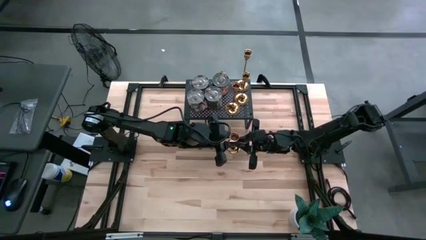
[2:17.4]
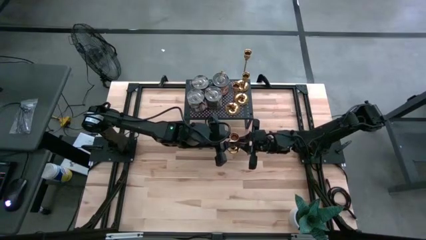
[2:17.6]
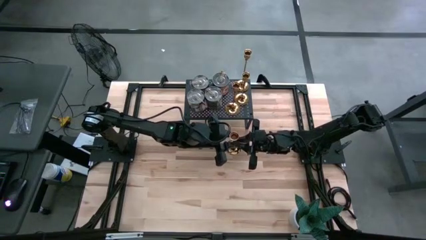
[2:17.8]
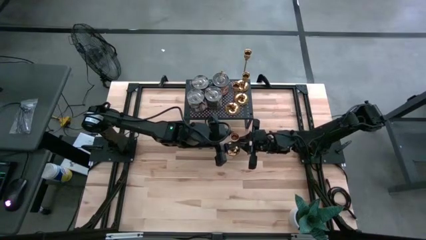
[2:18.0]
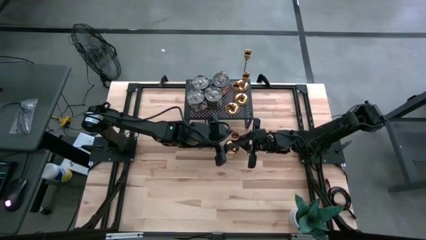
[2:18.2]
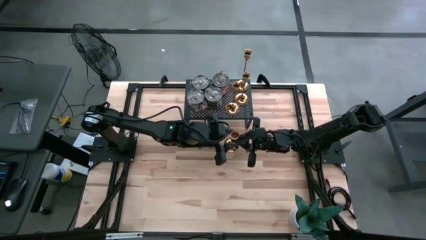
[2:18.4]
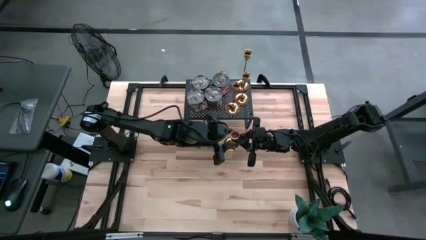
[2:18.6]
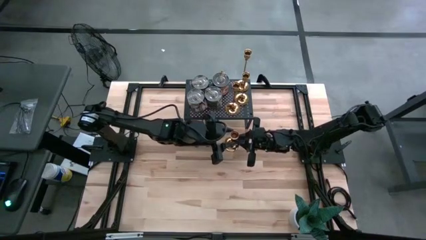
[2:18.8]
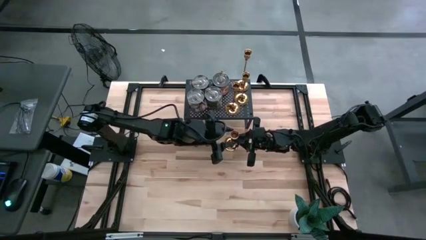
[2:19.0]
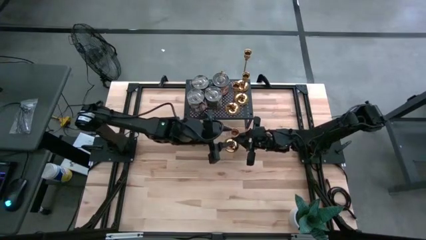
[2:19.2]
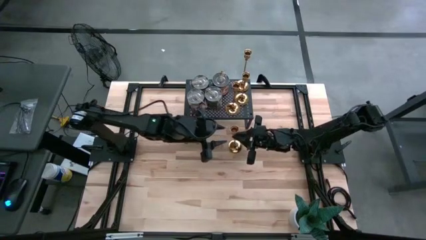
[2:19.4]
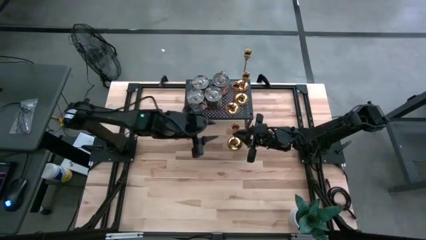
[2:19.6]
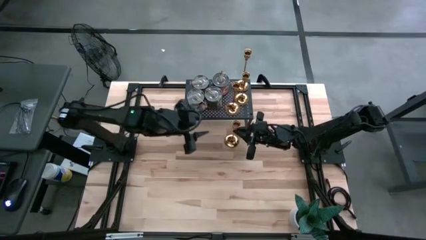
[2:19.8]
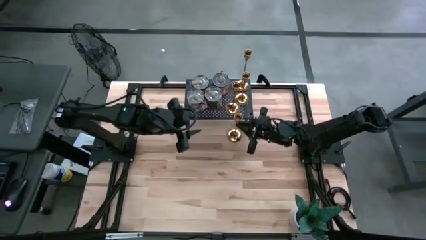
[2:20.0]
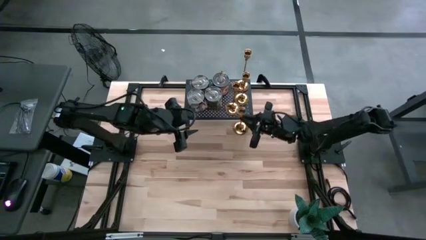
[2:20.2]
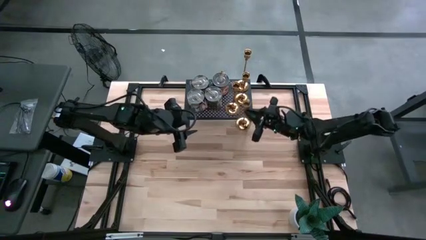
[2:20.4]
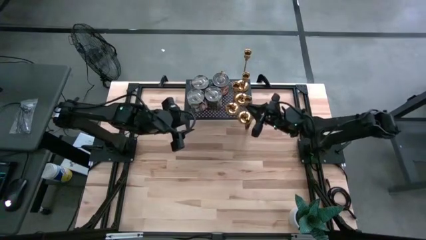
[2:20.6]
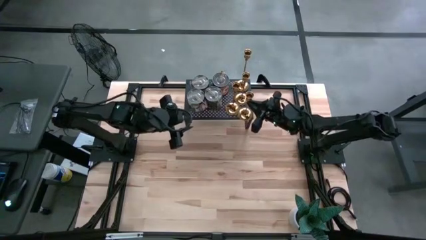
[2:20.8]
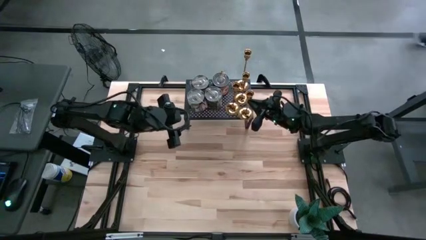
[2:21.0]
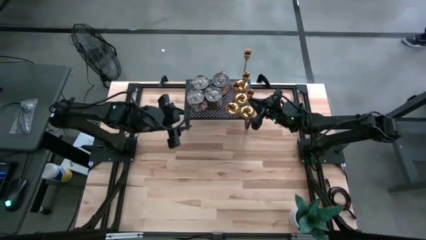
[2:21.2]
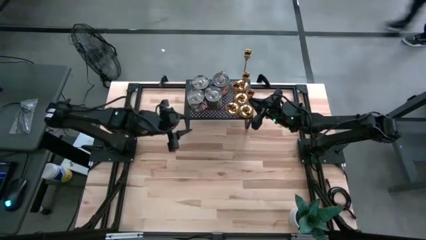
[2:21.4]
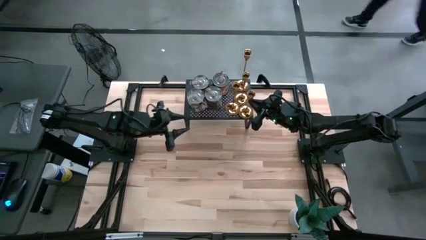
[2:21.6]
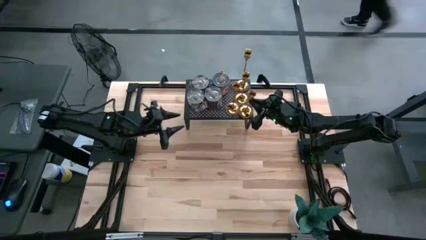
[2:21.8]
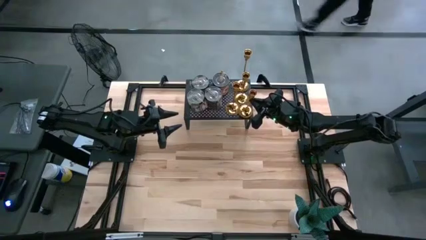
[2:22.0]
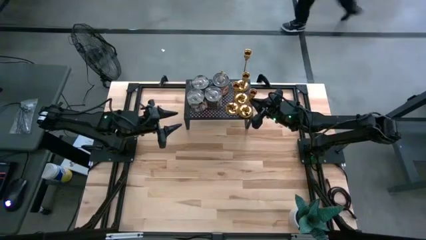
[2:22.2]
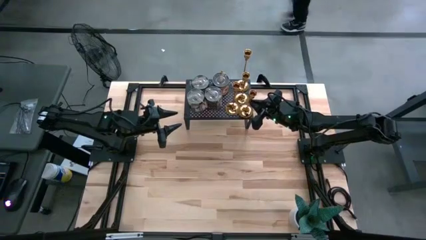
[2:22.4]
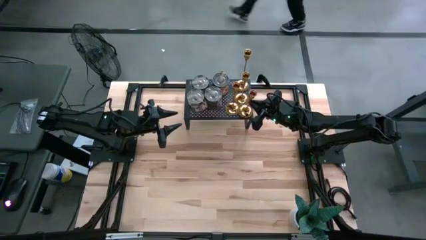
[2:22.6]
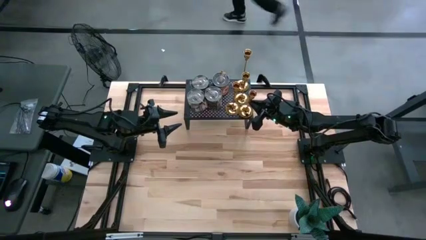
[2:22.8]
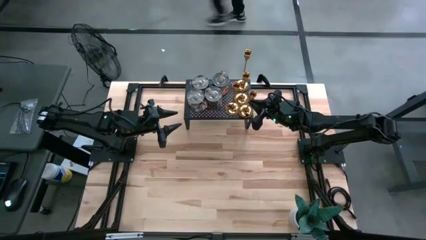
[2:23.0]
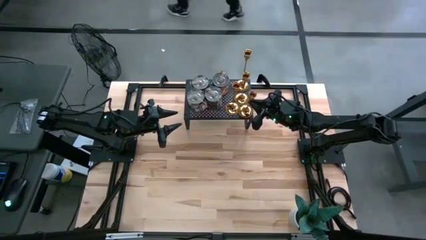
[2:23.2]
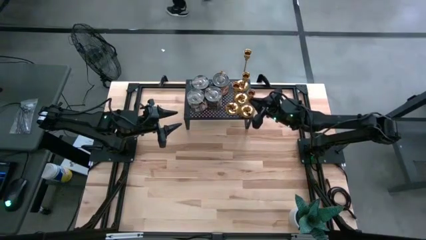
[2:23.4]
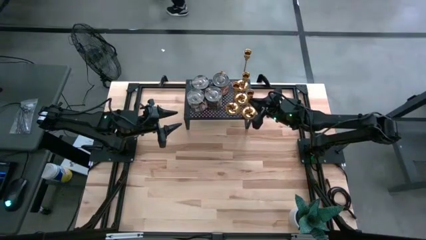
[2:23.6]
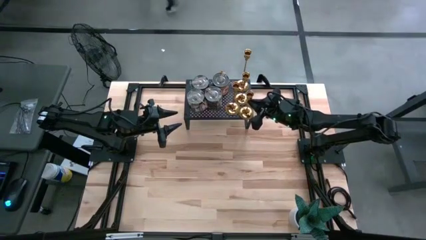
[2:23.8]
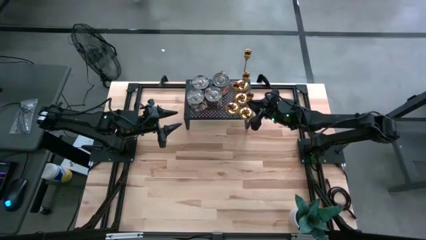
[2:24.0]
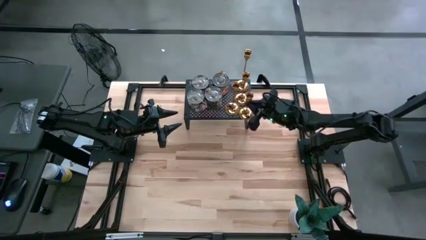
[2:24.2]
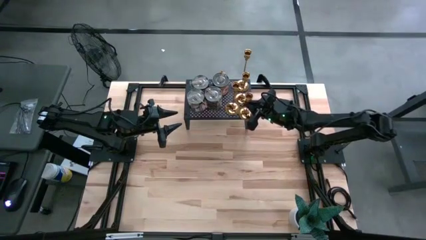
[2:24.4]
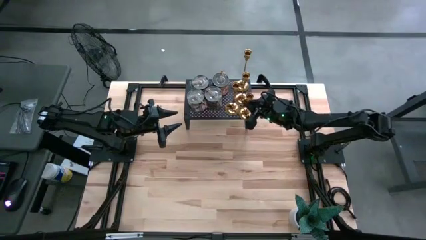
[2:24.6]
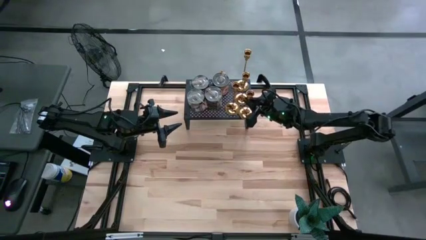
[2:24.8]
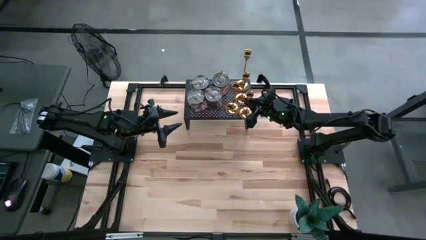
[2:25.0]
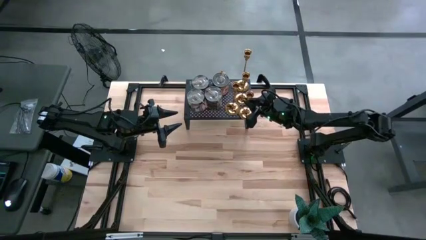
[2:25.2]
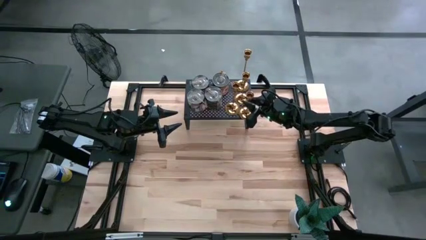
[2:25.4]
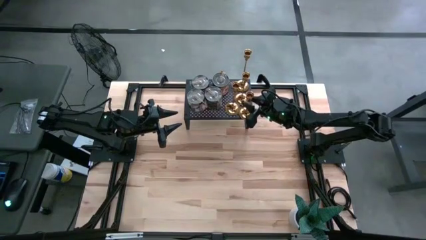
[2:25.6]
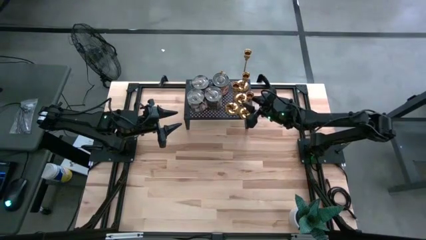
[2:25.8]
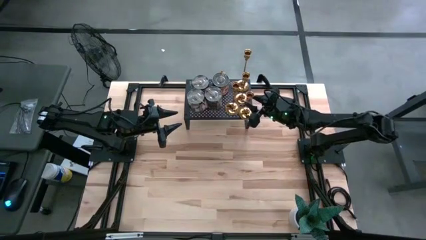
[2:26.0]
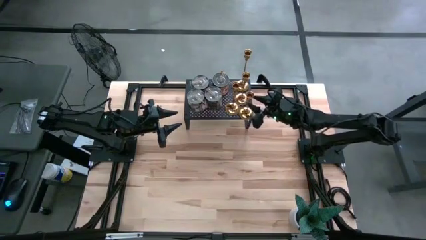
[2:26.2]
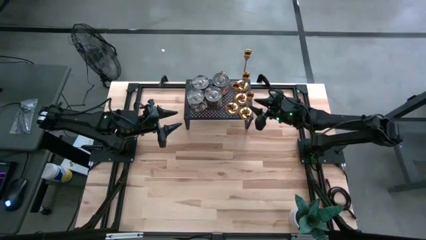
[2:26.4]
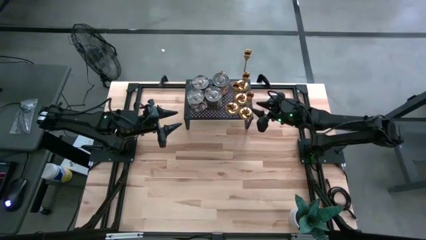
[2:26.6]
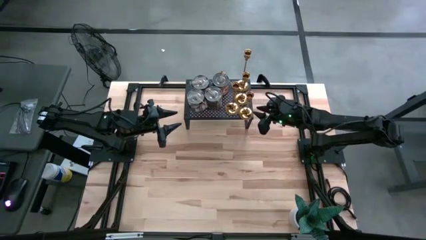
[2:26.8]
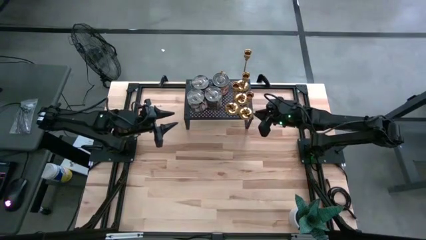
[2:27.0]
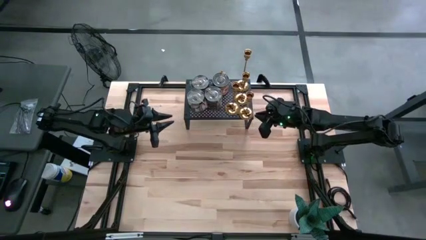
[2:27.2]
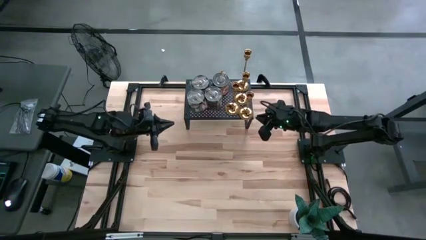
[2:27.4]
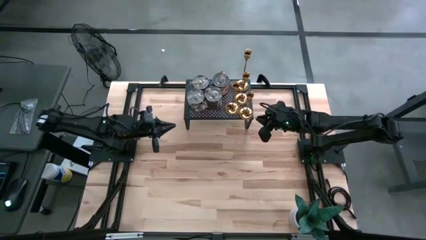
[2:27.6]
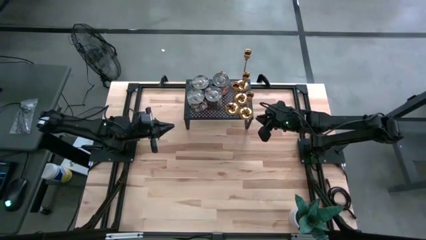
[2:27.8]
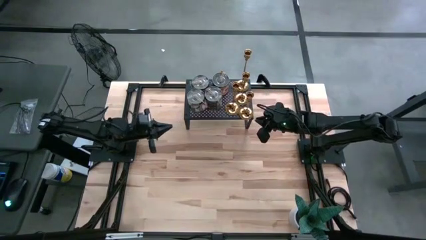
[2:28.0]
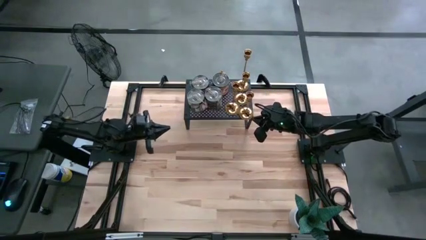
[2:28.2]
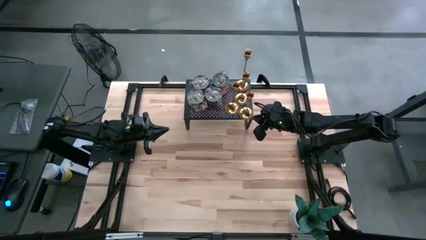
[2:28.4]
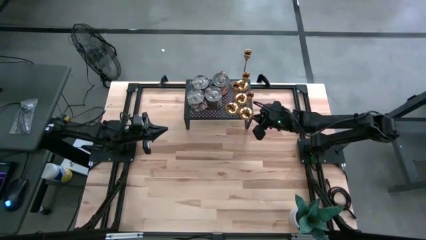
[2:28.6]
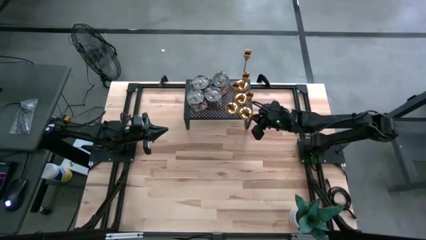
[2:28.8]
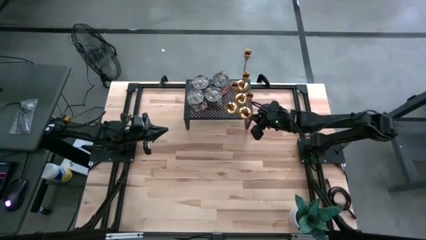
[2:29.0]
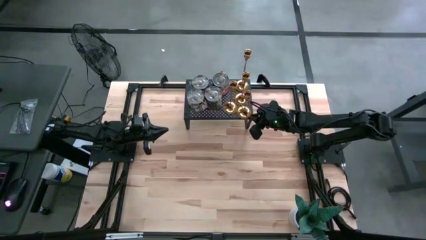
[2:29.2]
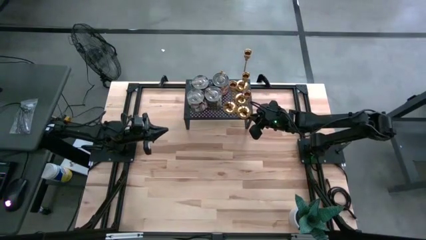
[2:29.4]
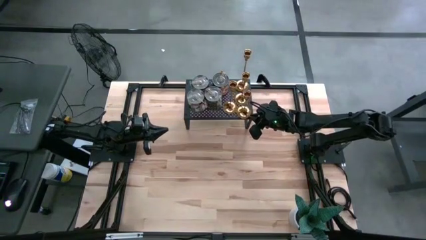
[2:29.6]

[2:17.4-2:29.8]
Task: Pick & Place candle stick holders
Align the golden candle holder with the golden candle holder on the shelf

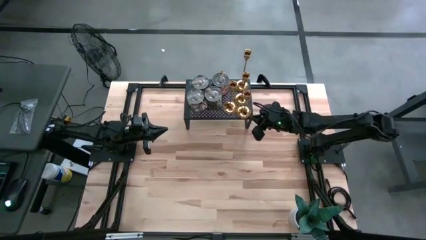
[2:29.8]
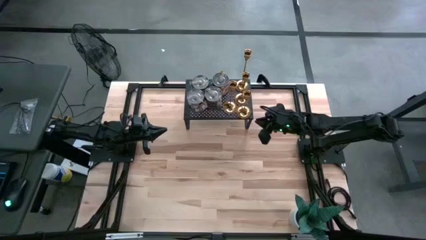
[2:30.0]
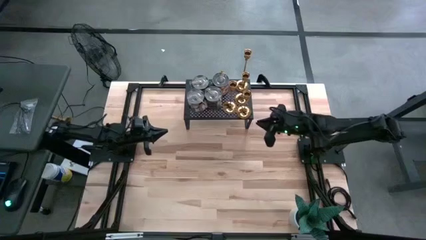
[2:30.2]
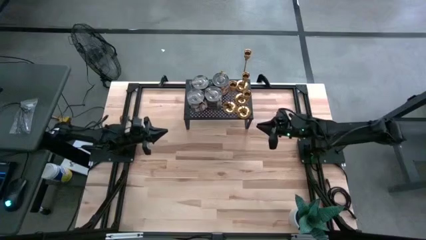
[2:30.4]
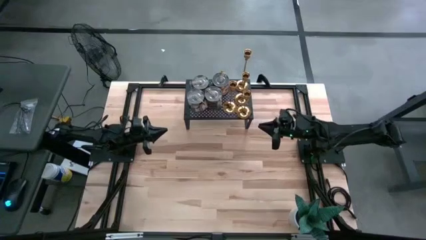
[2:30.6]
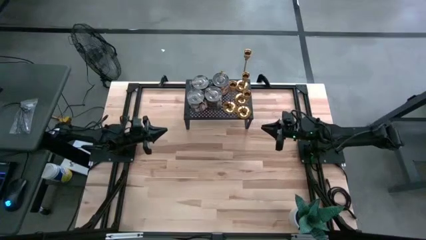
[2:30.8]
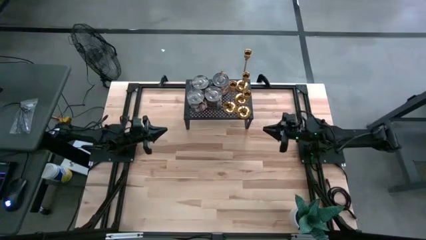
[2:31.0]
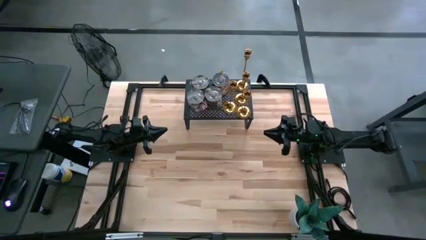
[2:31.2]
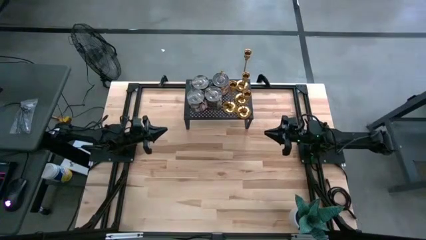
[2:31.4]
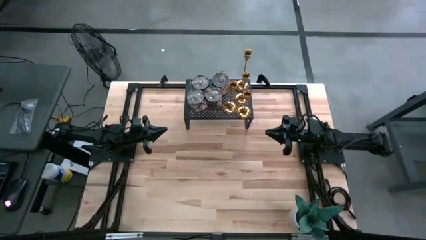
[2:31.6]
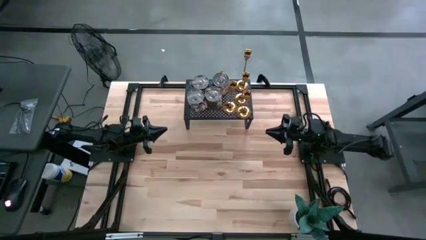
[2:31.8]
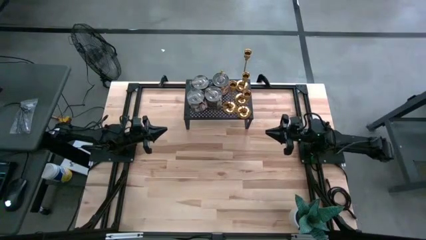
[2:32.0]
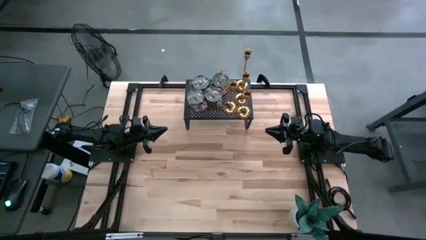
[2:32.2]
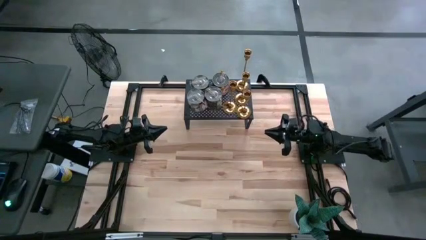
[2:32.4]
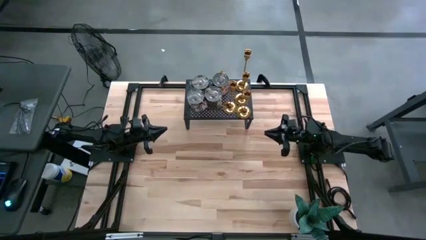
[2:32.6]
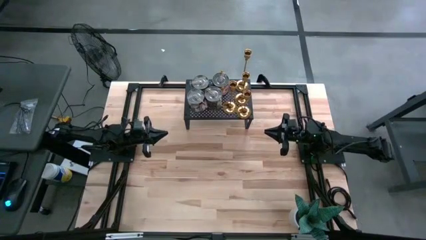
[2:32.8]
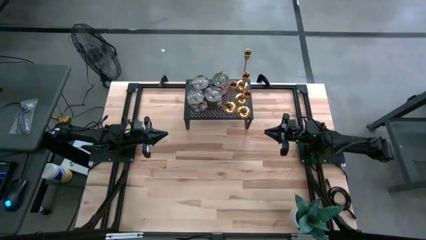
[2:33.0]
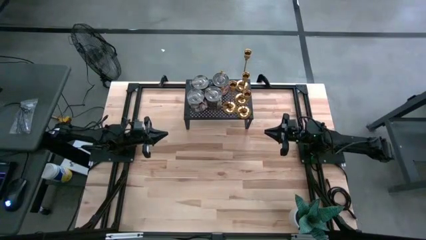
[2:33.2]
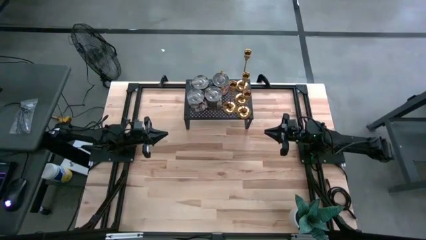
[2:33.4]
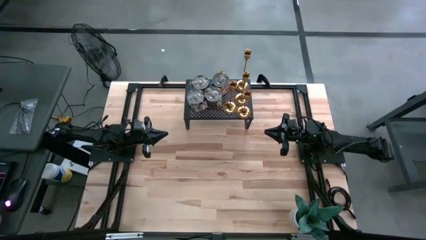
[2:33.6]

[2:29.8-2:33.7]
Return to Home Position
